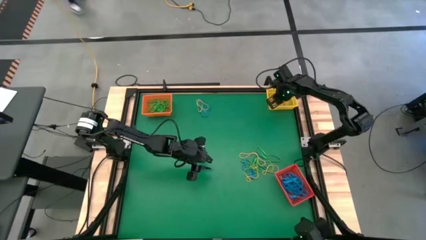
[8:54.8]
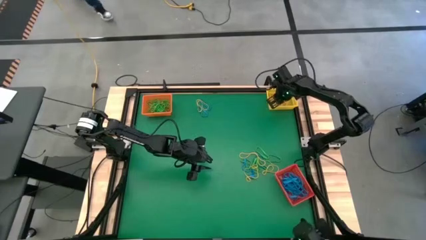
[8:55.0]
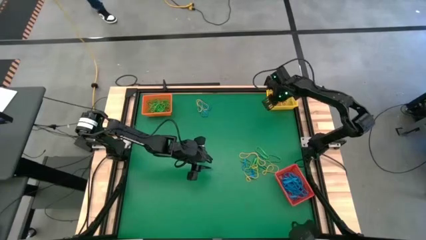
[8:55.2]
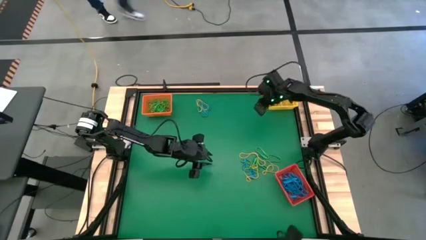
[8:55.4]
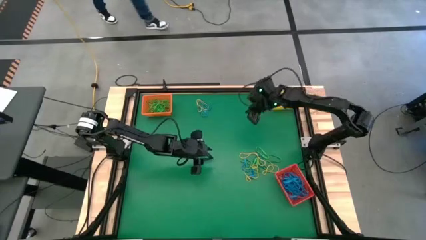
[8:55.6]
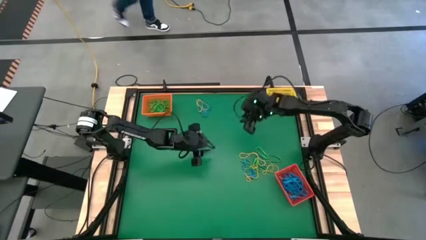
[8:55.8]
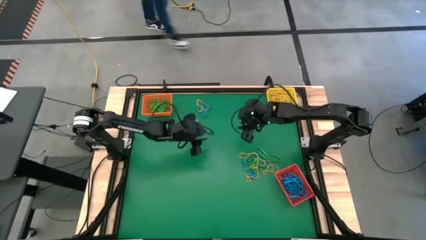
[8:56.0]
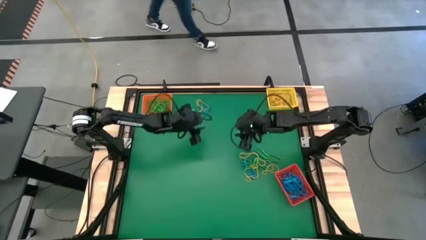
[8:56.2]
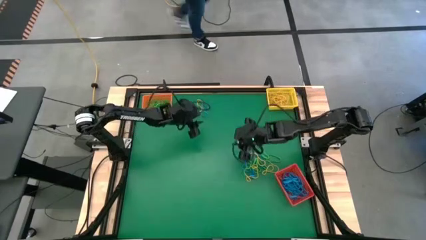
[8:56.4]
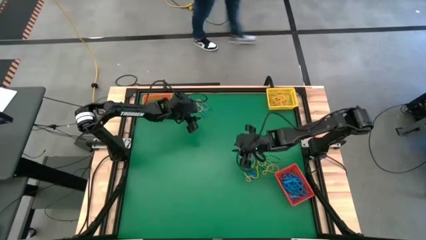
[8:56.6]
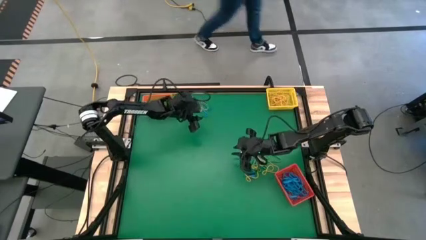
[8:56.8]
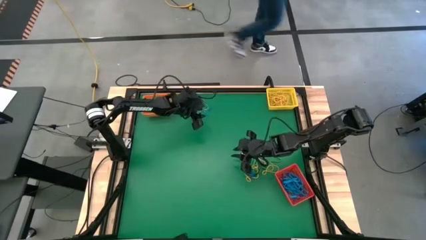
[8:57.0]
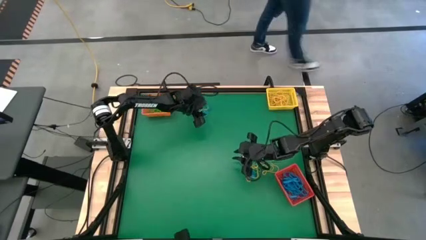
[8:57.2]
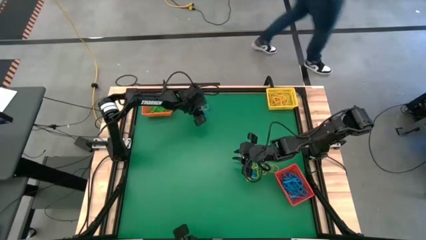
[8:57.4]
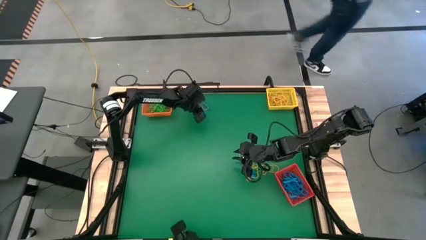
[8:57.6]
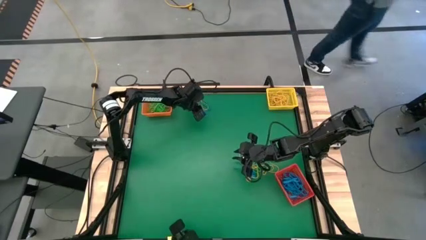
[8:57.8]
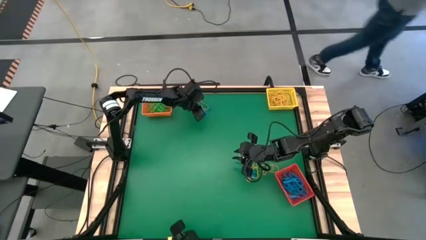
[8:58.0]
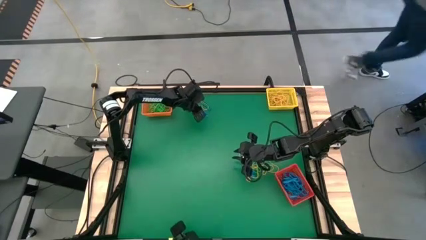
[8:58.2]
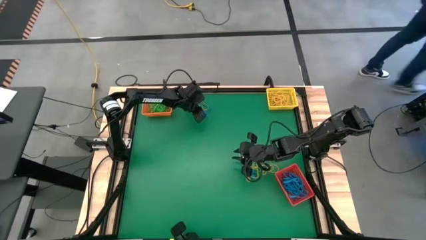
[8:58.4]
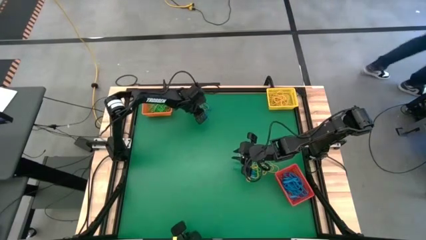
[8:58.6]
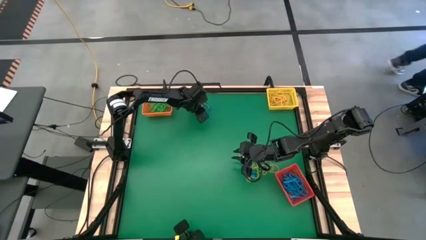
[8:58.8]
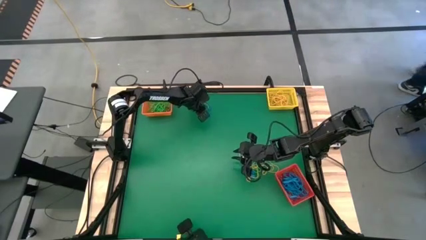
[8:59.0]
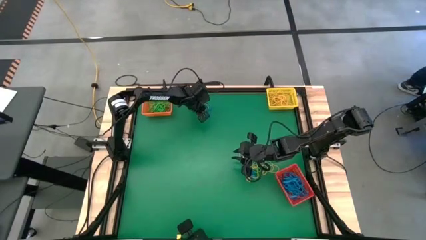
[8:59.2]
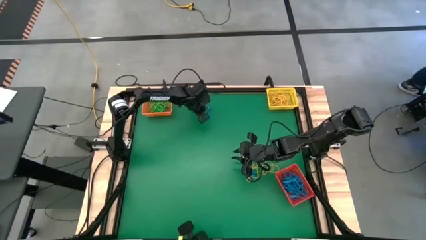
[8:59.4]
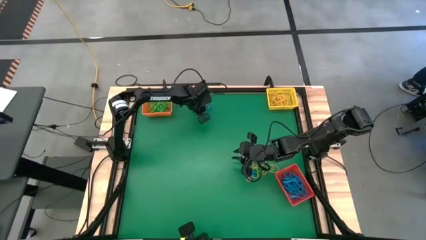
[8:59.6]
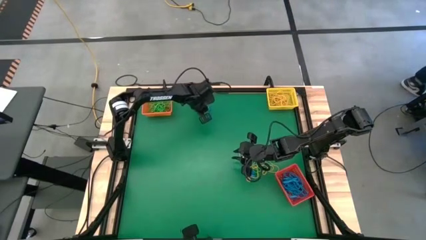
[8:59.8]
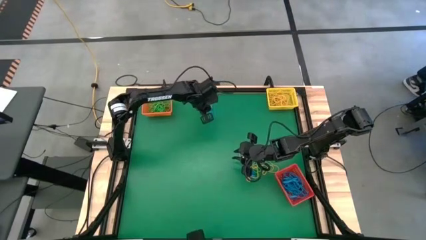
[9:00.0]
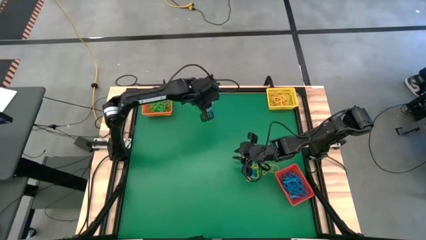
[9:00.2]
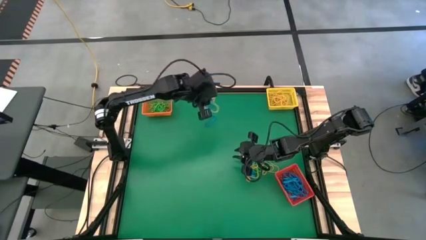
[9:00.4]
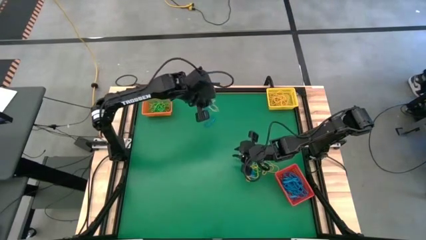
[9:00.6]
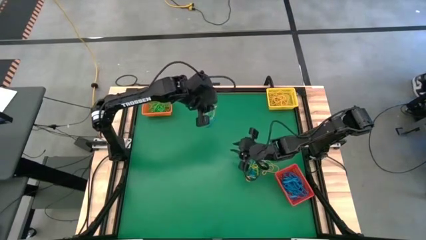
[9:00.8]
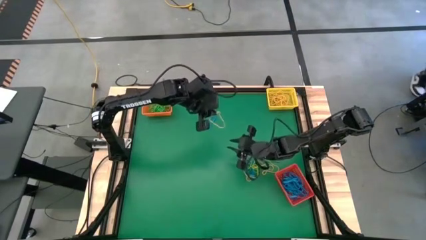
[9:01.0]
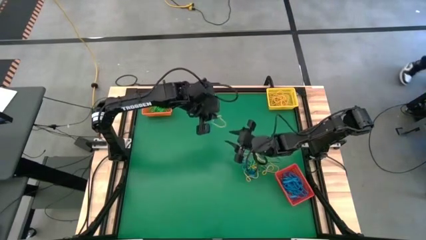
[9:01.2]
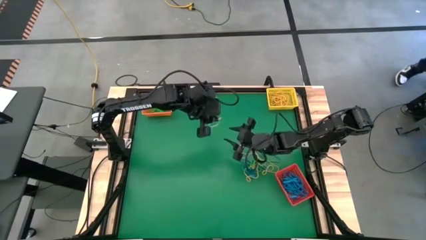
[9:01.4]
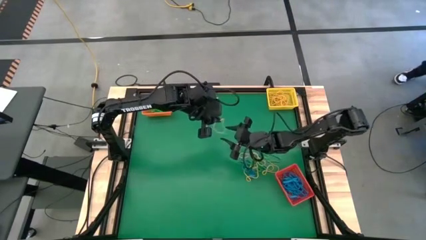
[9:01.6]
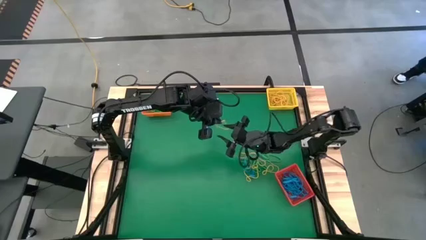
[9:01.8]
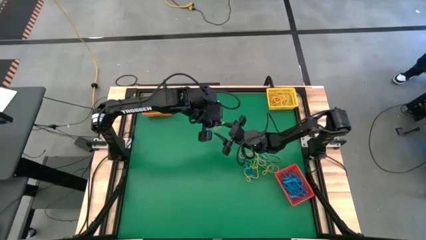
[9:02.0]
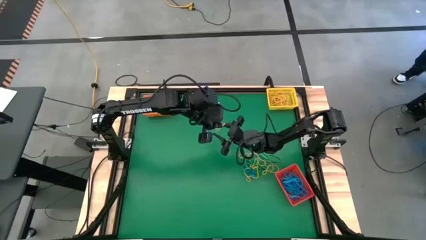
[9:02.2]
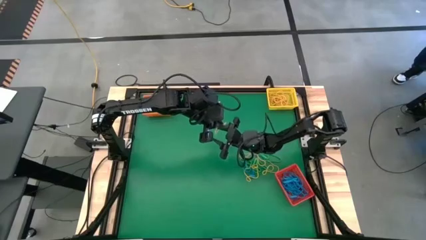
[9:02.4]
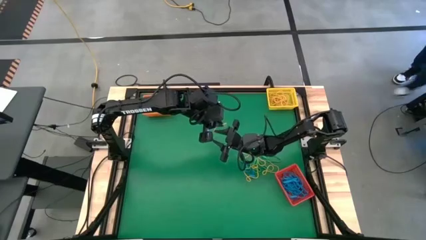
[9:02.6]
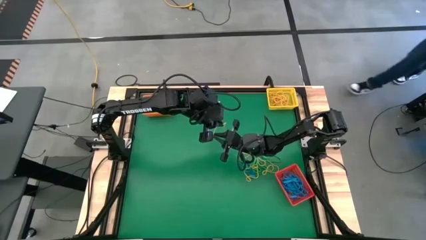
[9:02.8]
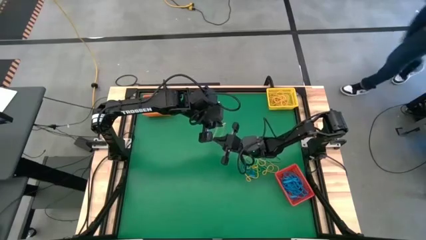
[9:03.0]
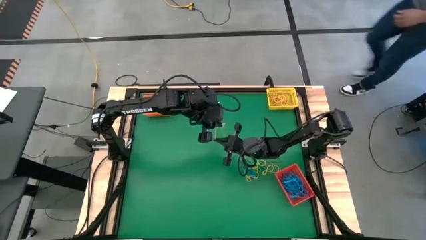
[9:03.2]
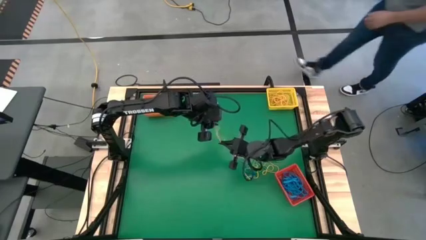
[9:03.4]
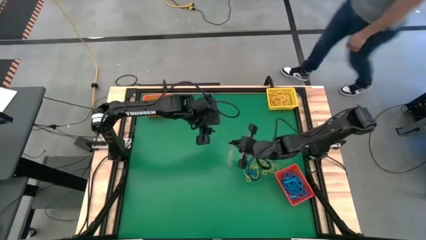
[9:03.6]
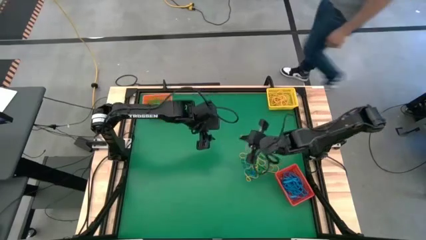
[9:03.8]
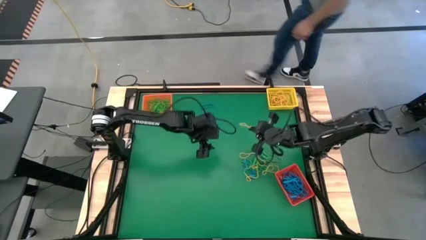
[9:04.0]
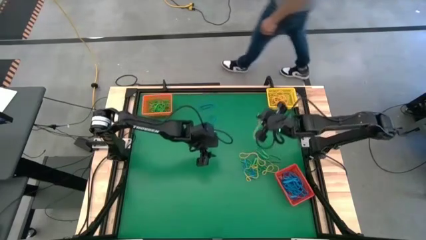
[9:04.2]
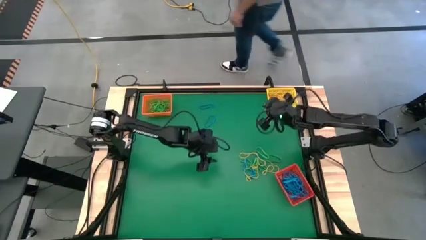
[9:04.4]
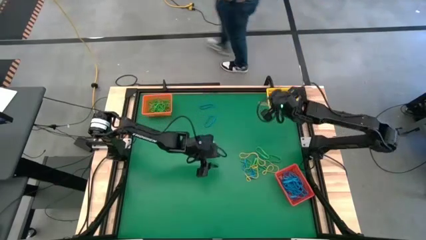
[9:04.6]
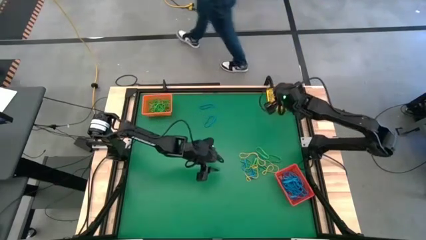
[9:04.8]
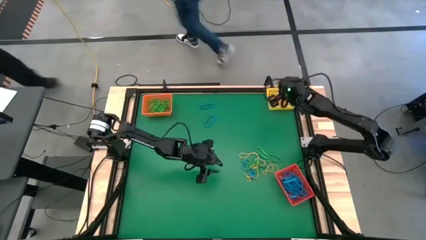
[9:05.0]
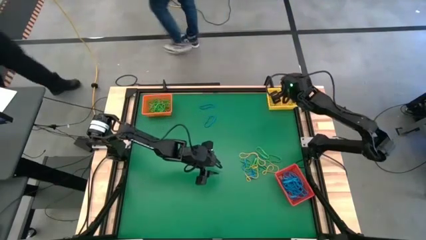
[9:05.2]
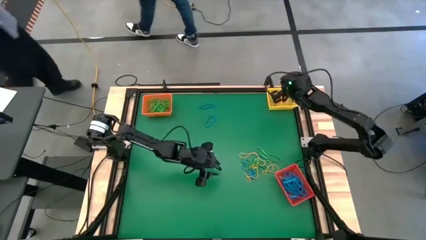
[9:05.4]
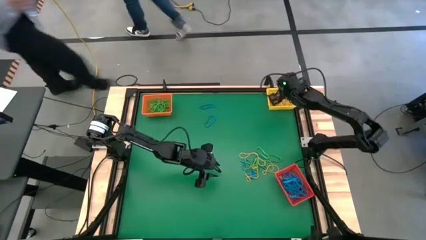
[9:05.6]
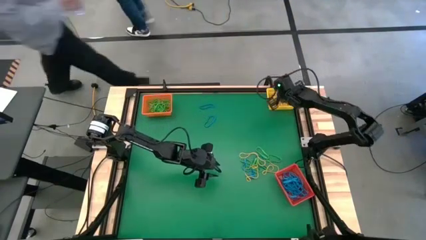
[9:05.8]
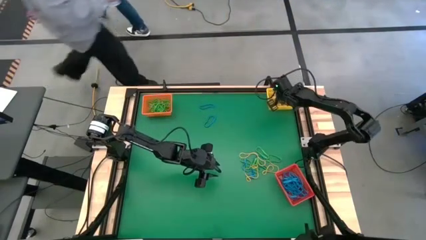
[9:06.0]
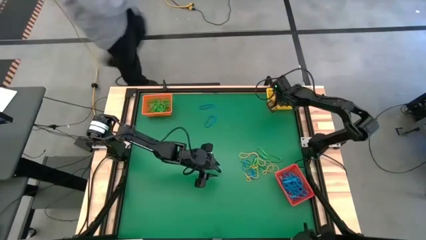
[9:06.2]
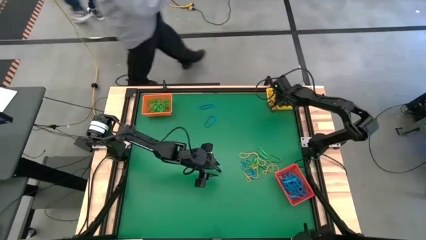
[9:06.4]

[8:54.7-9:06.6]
Task: Sort rubber bands into baskets
Put the yellow rubber band into the yellow bin

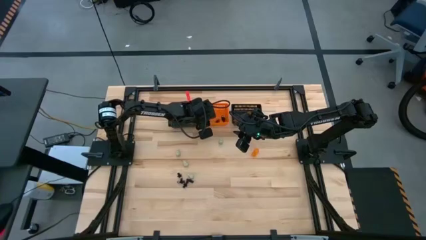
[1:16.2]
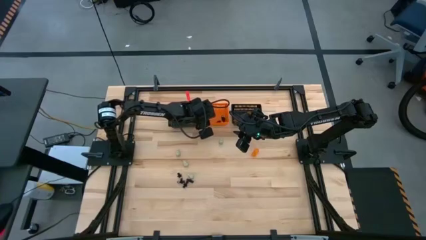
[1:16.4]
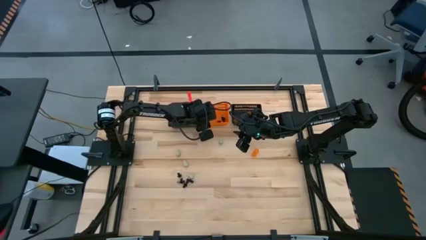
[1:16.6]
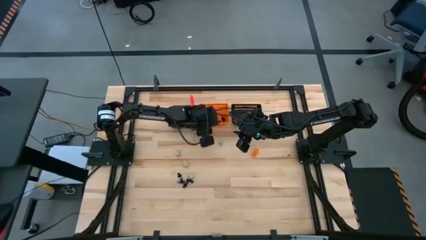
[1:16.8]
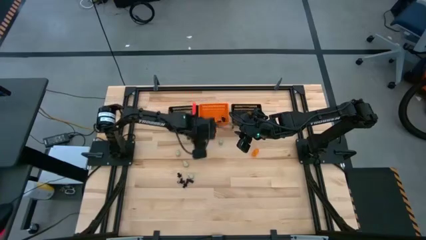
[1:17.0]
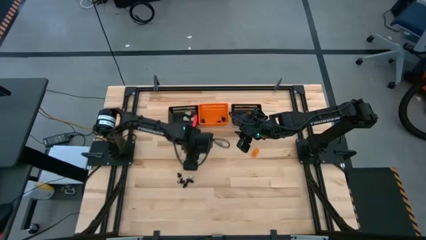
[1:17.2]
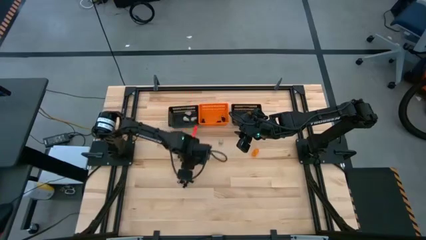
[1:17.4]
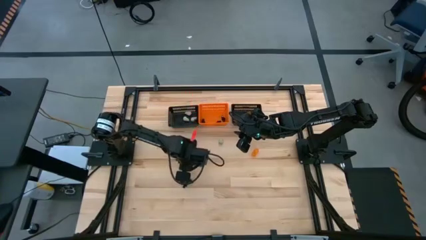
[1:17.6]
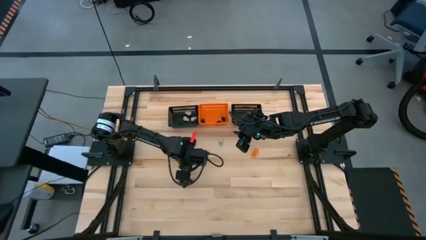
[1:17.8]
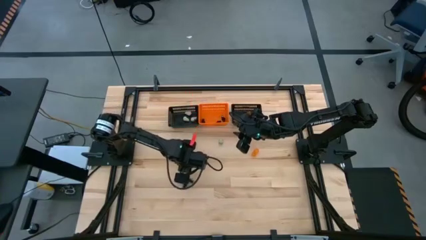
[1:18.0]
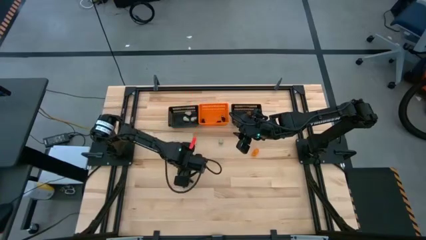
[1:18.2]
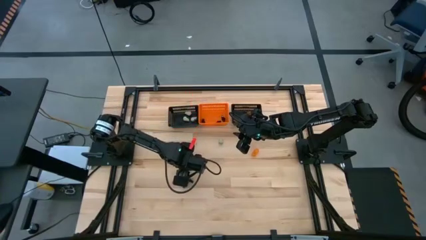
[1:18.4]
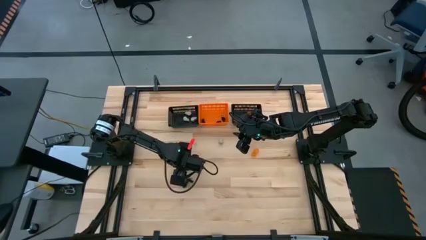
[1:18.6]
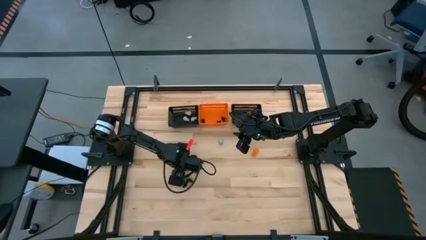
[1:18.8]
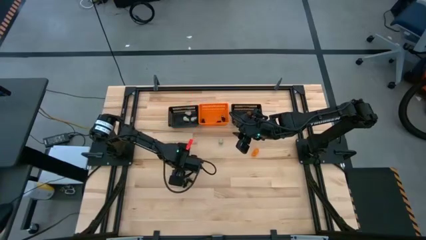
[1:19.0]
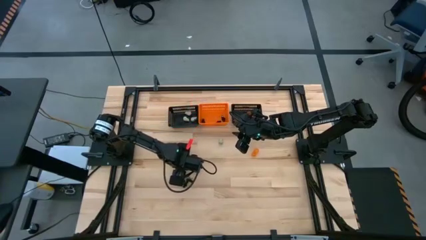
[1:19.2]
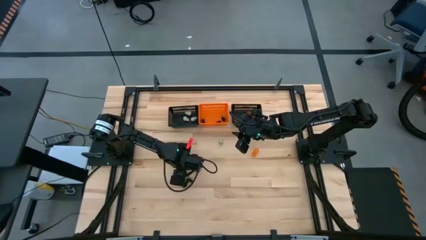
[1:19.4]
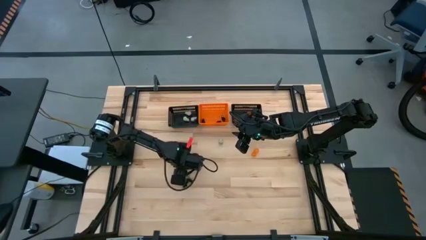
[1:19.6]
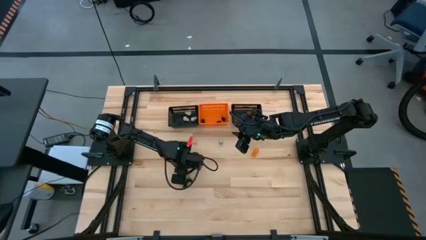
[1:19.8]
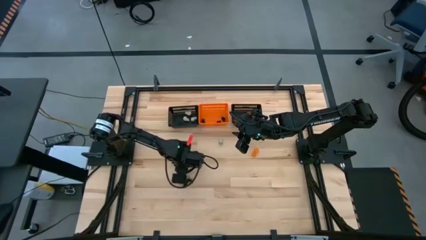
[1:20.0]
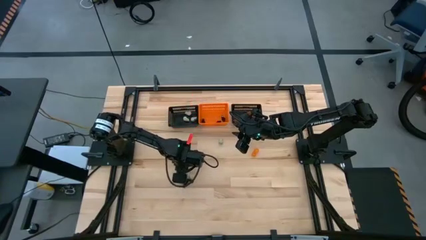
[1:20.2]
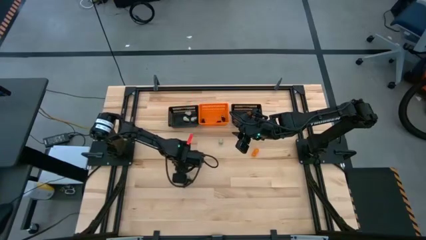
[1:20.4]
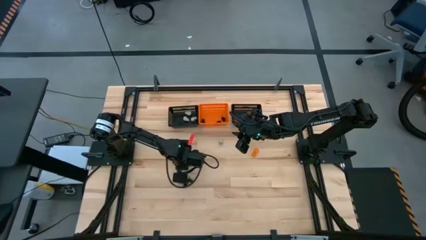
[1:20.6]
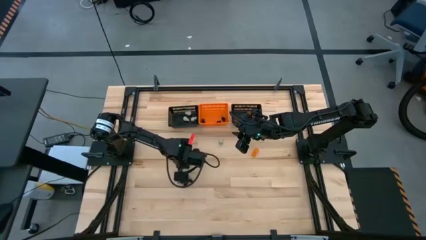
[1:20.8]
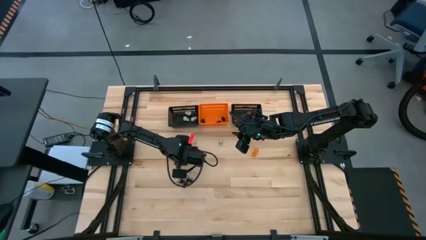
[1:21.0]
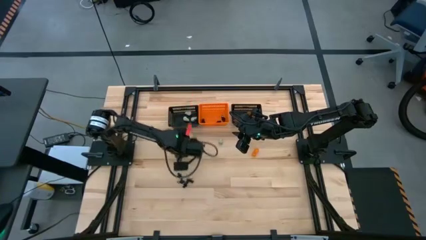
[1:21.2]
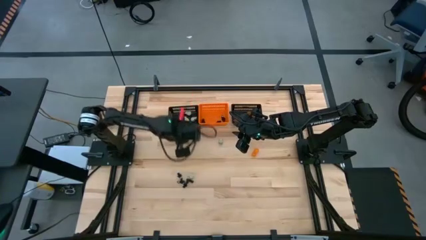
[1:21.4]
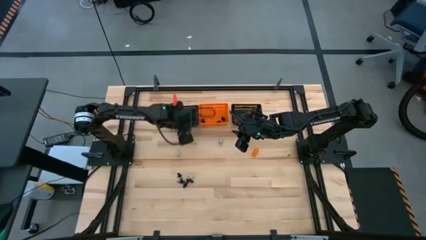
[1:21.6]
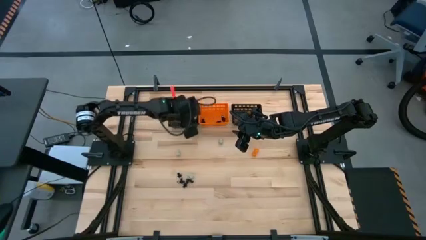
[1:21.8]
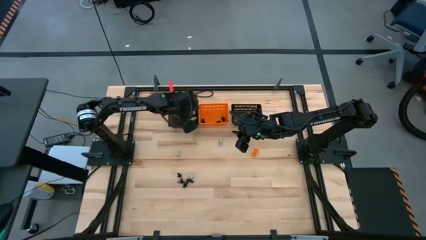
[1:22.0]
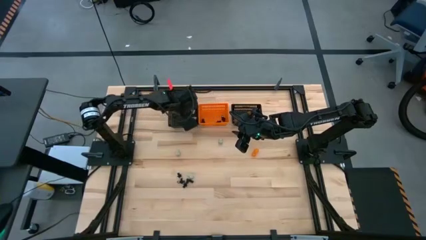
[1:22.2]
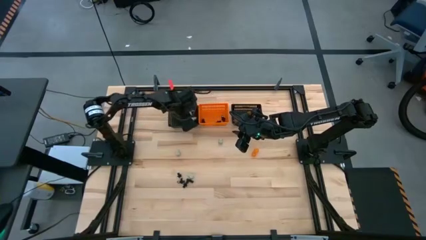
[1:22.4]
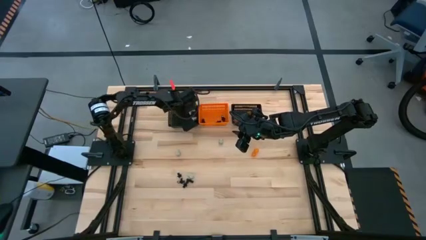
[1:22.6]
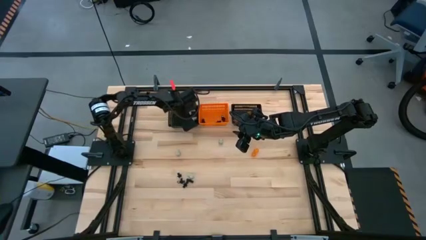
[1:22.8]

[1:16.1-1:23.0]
Task: Sort Halloween decoration
Put the white skull toy into the left black bin
